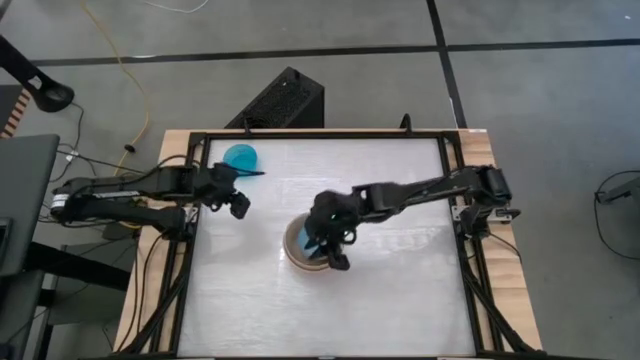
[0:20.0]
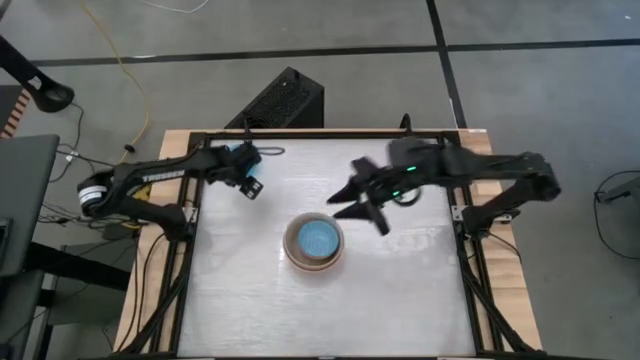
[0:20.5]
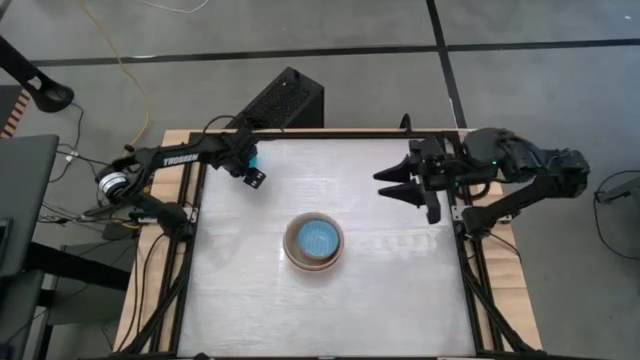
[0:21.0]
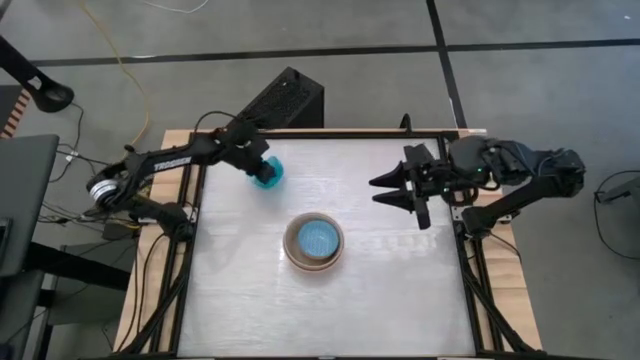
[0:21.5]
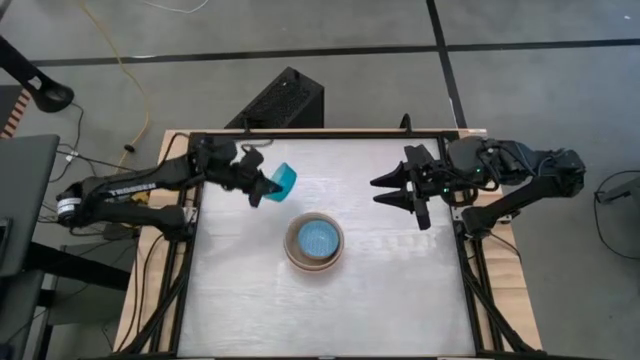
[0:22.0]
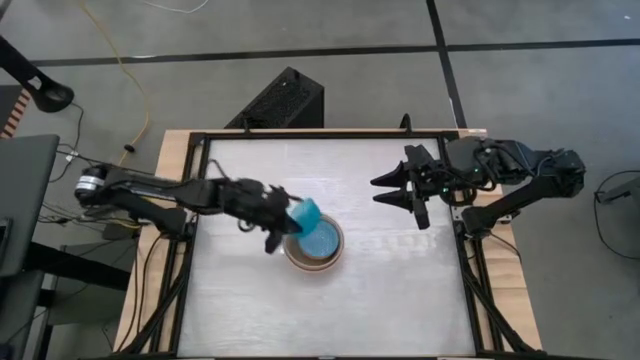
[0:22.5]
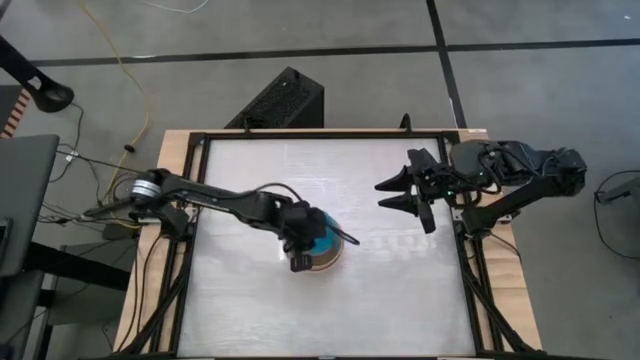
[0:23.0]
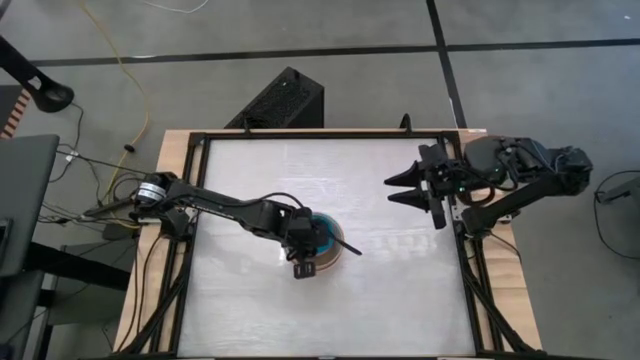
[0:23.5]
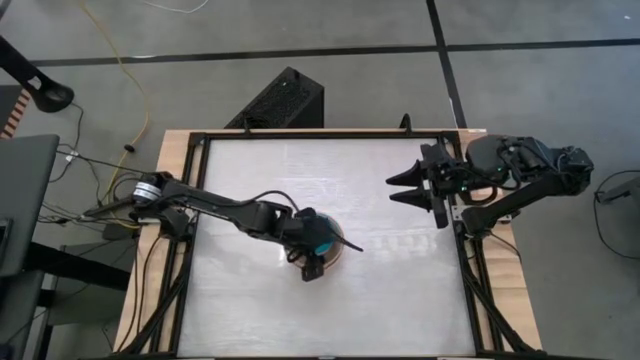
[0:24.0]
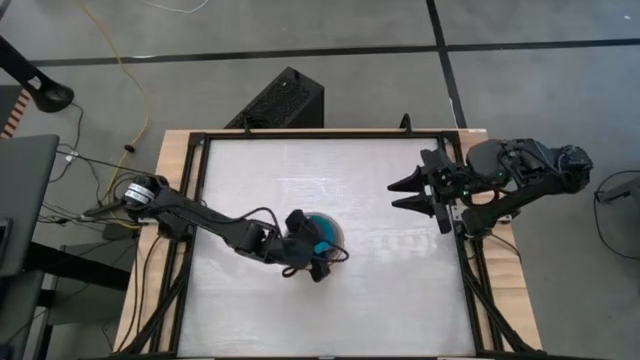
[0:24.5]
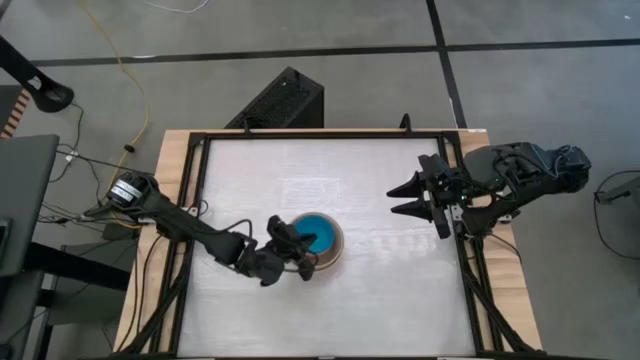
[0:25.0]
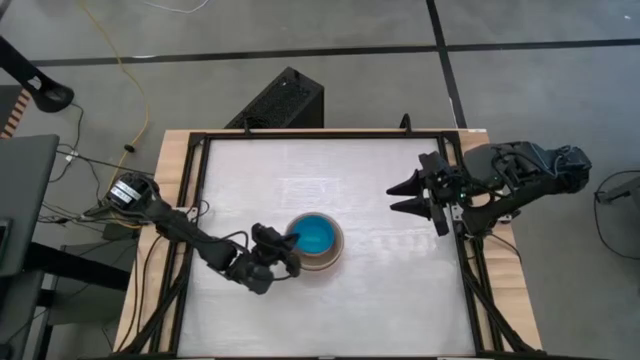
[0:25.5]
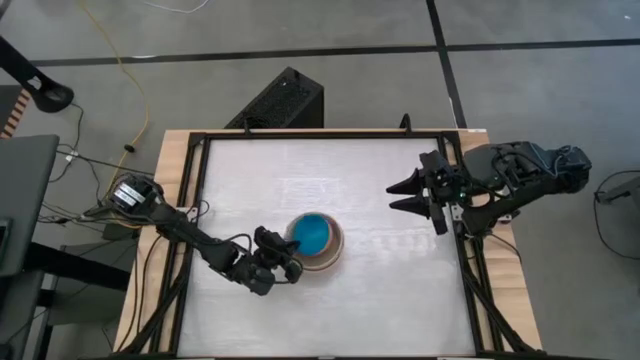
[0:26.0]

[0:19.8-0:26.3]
Stack the blue bowl on top of the blue patterned bowl

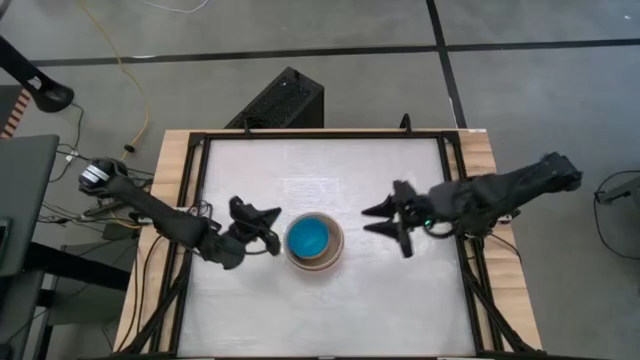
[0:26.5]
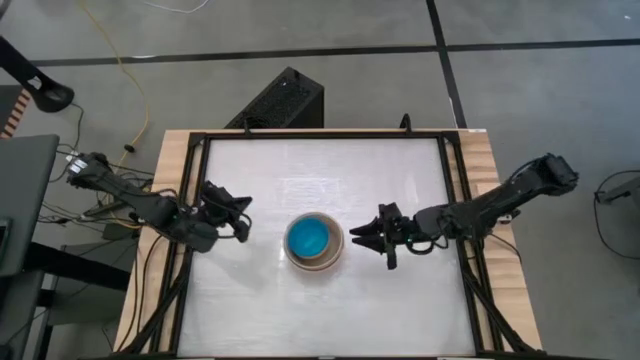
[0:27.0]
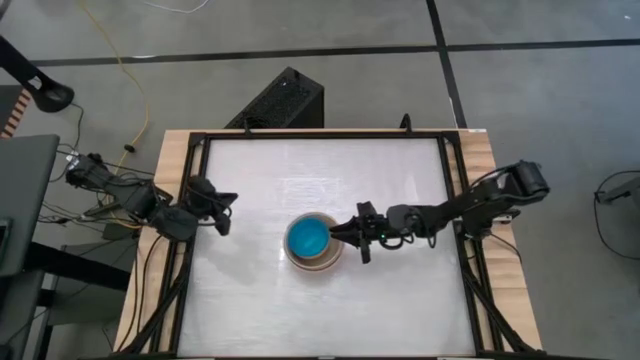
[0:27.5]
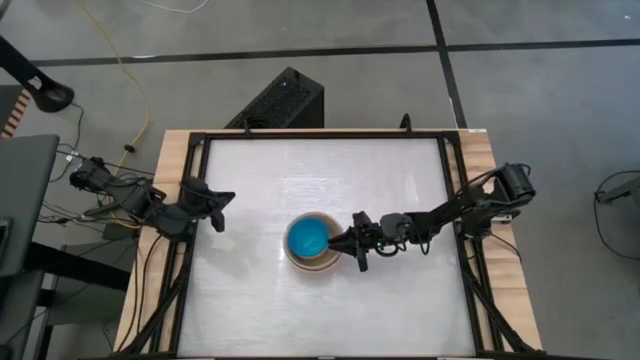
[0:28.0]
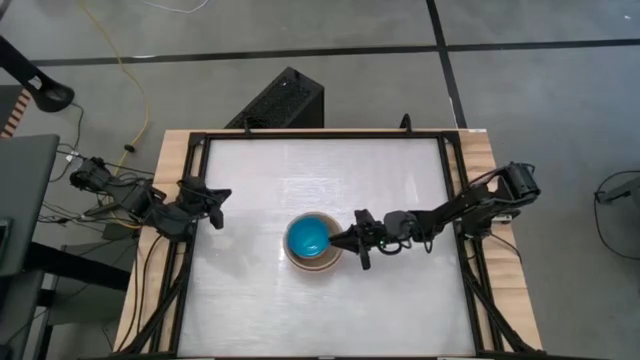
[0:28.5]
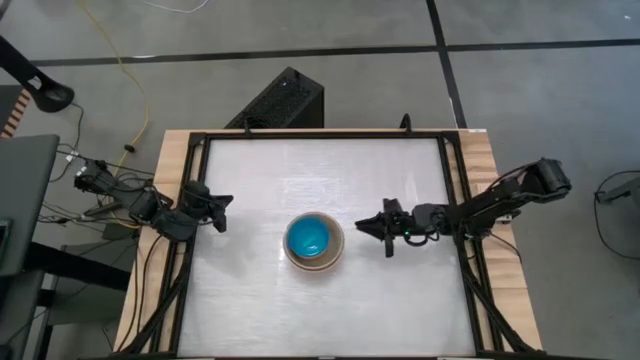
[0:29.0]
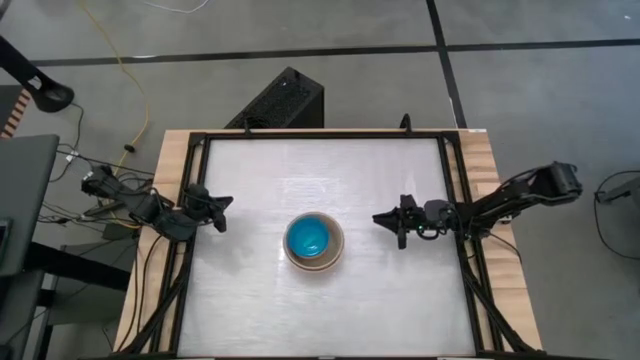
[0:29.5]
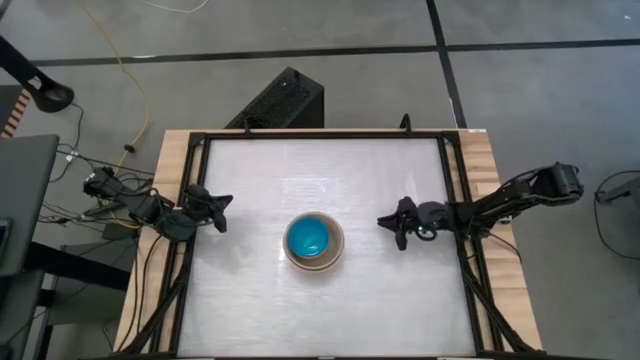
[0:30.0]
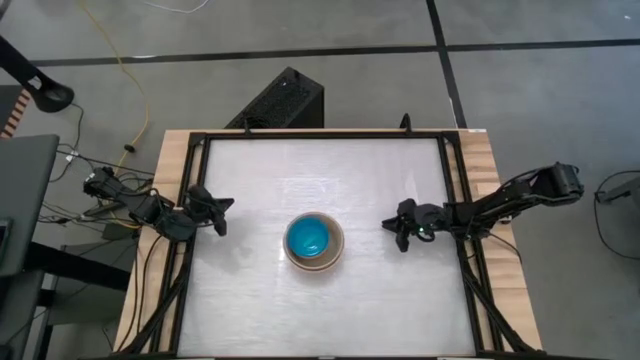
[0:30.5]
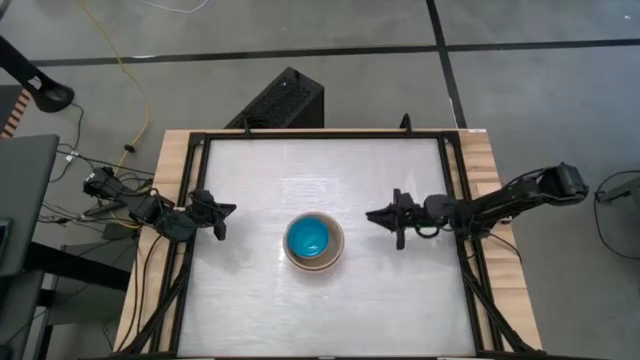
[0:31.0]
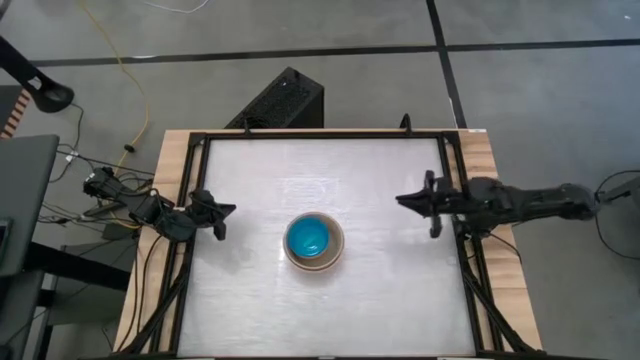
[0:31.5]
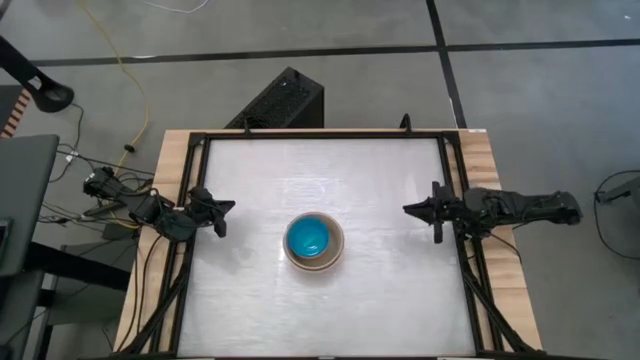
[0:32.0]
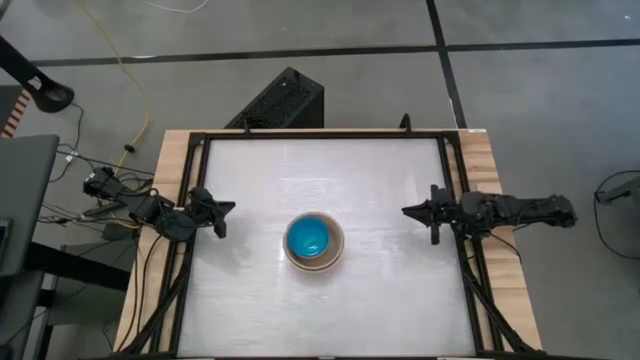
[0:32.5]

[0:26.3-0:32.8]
Return to Home Position
